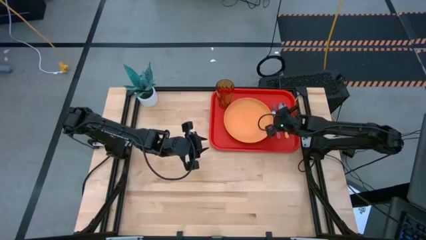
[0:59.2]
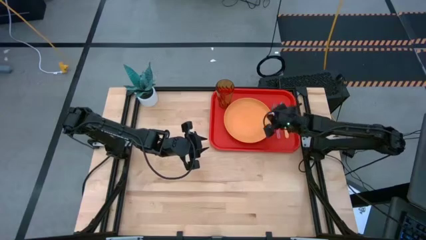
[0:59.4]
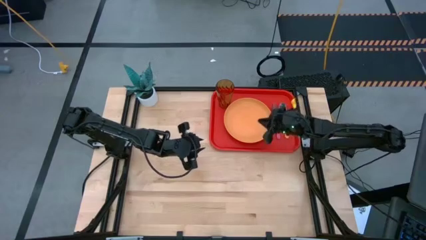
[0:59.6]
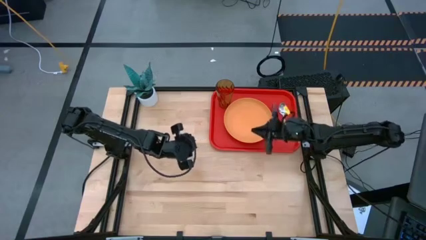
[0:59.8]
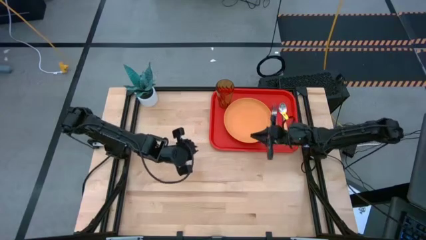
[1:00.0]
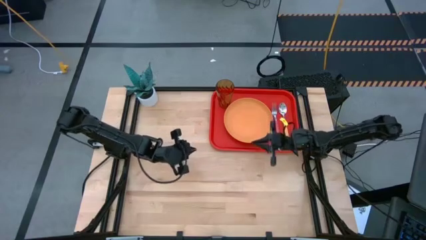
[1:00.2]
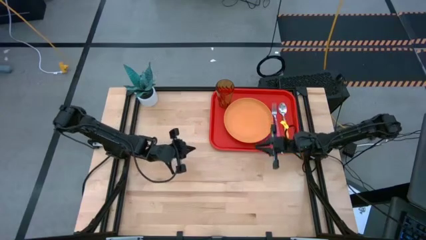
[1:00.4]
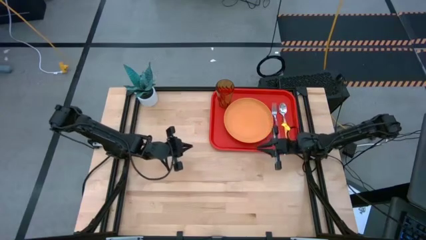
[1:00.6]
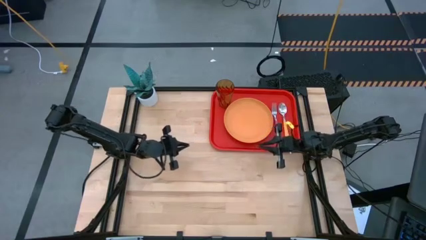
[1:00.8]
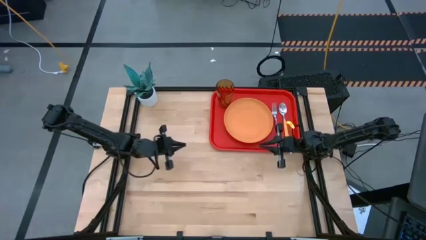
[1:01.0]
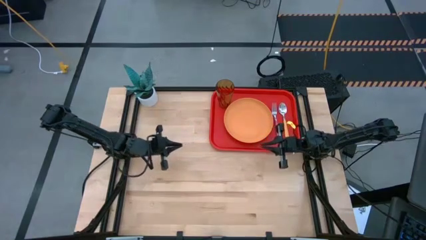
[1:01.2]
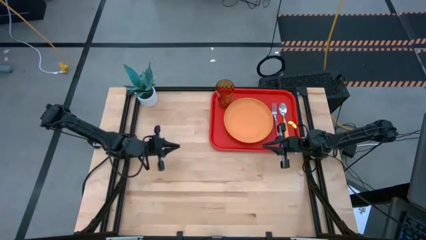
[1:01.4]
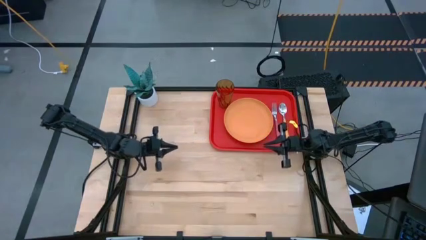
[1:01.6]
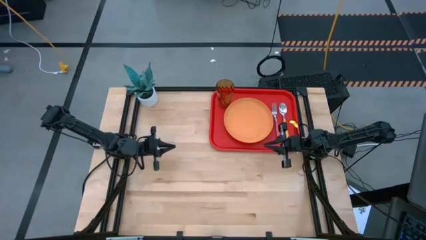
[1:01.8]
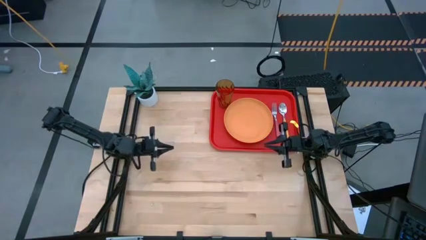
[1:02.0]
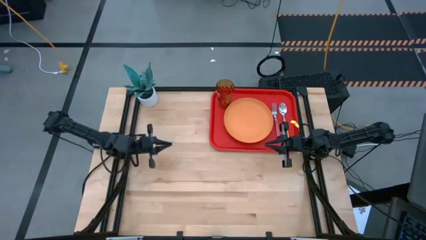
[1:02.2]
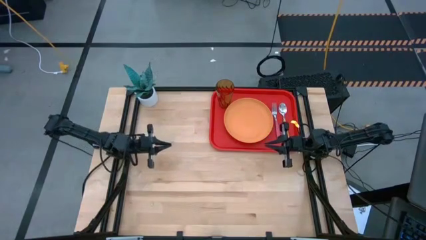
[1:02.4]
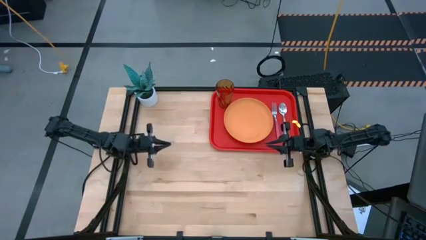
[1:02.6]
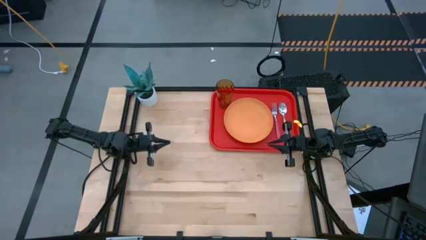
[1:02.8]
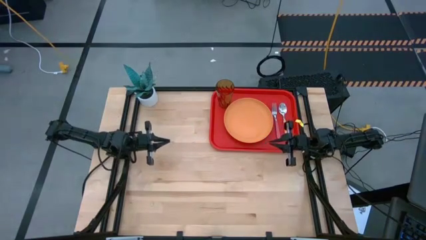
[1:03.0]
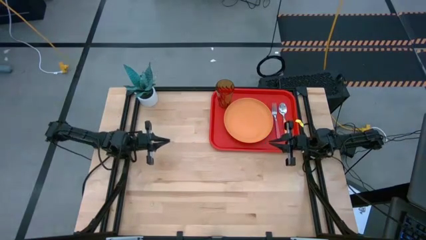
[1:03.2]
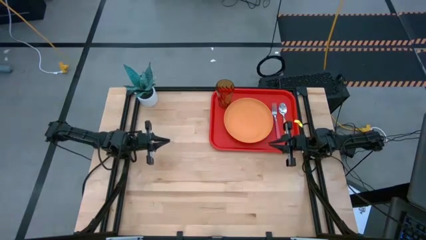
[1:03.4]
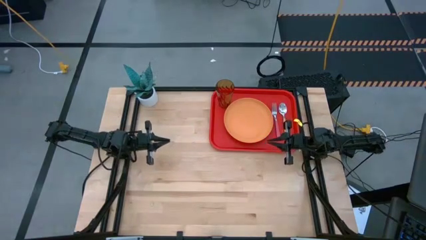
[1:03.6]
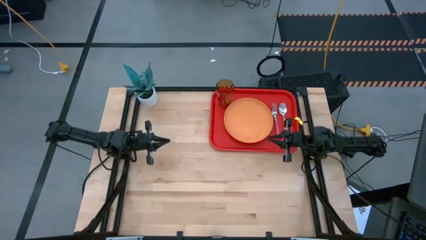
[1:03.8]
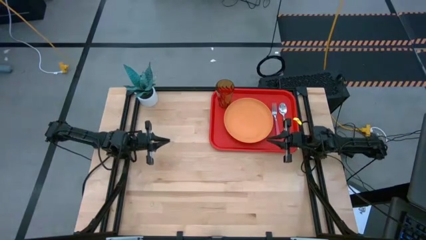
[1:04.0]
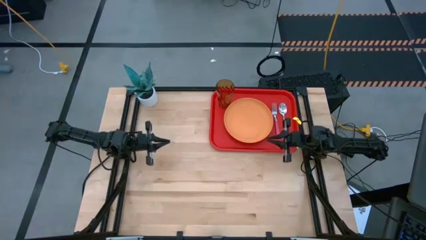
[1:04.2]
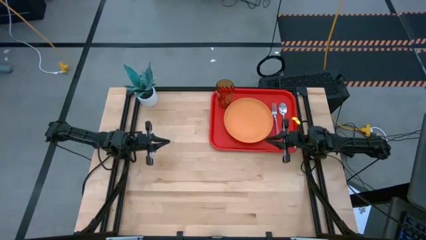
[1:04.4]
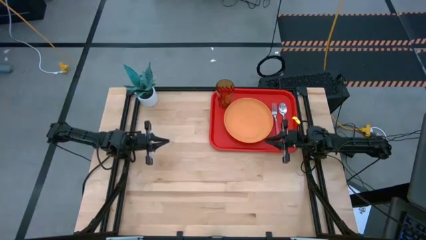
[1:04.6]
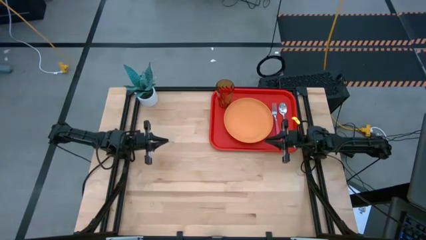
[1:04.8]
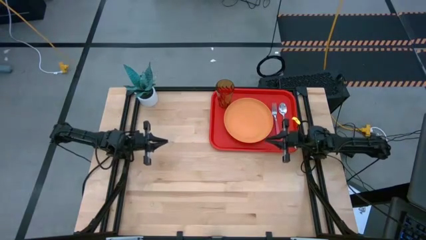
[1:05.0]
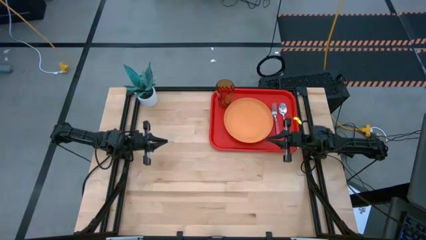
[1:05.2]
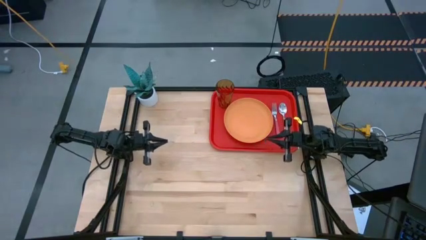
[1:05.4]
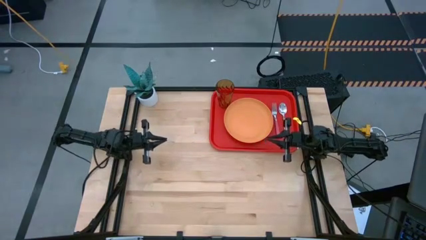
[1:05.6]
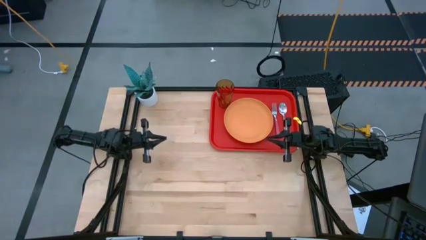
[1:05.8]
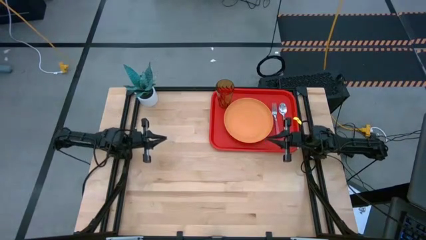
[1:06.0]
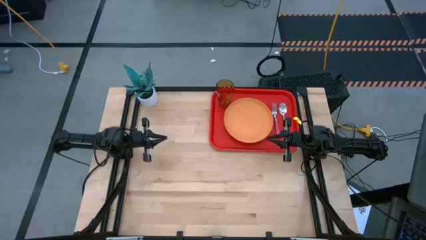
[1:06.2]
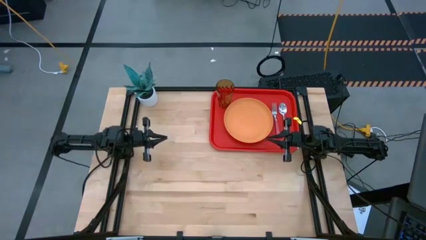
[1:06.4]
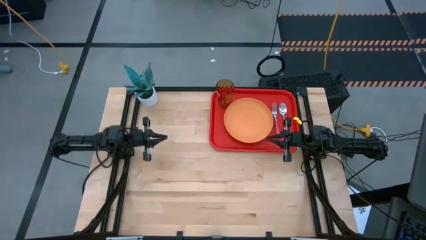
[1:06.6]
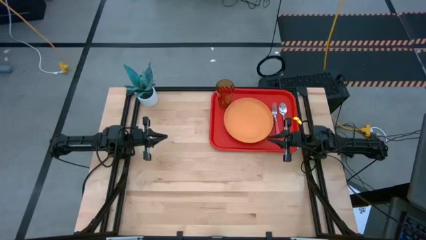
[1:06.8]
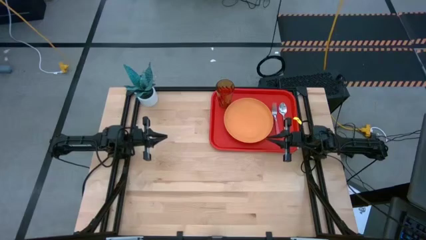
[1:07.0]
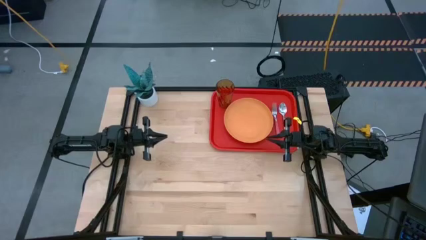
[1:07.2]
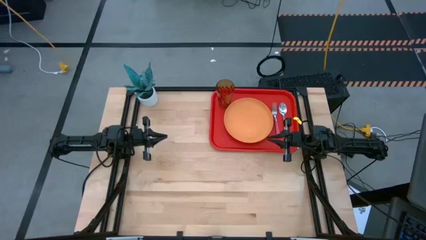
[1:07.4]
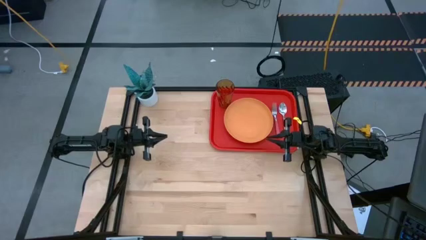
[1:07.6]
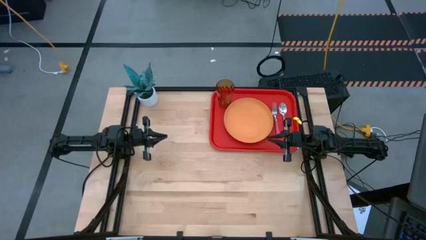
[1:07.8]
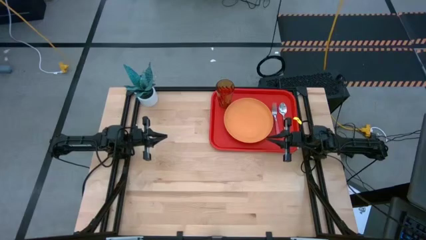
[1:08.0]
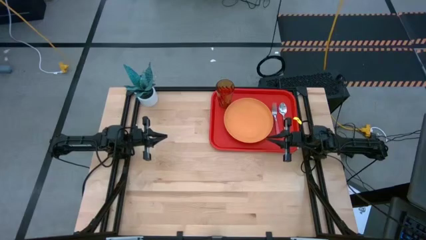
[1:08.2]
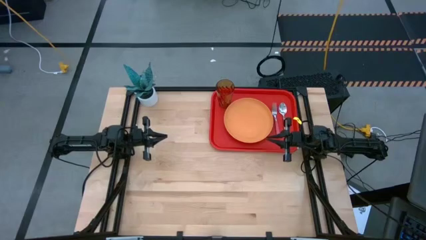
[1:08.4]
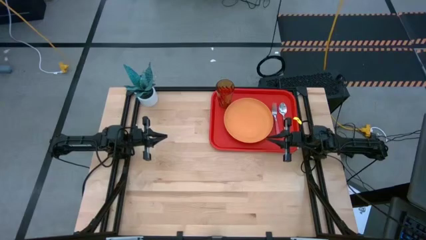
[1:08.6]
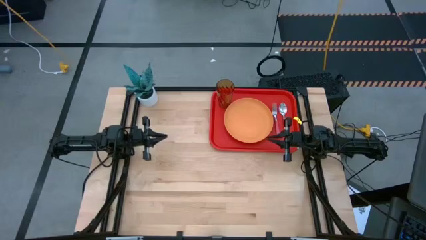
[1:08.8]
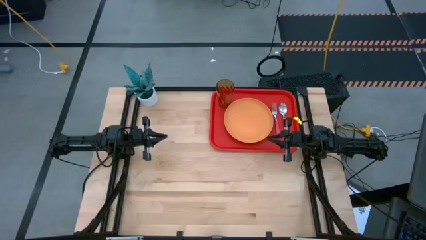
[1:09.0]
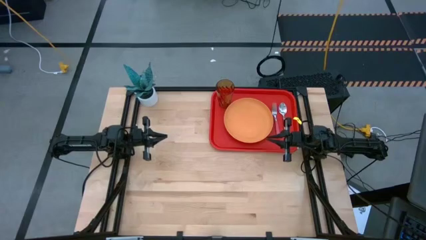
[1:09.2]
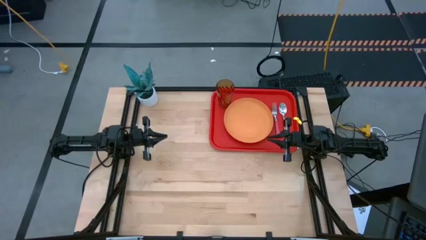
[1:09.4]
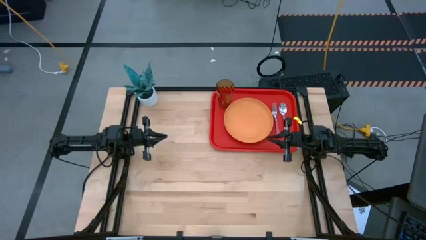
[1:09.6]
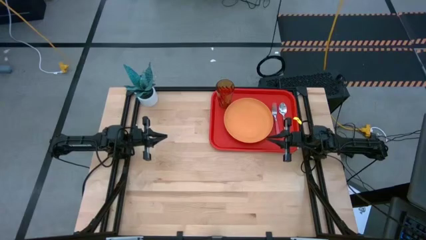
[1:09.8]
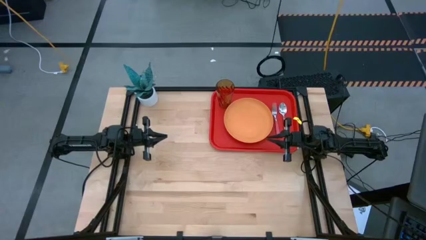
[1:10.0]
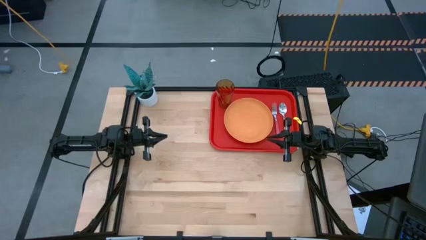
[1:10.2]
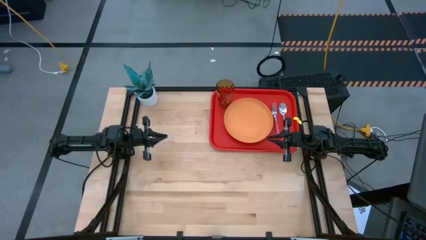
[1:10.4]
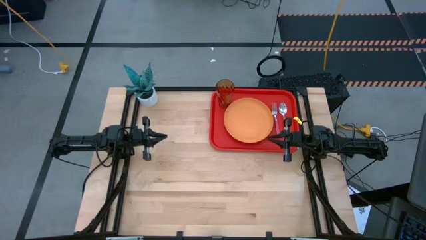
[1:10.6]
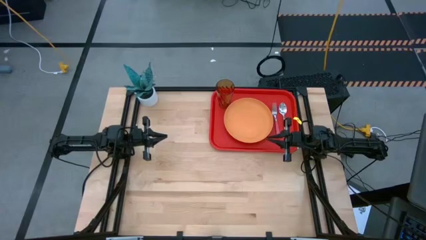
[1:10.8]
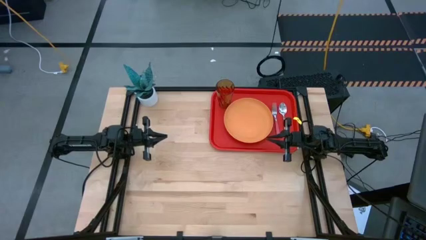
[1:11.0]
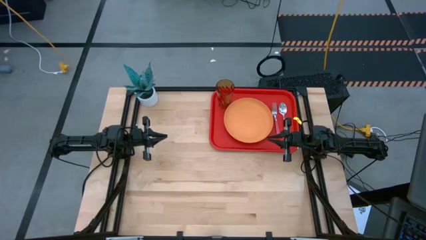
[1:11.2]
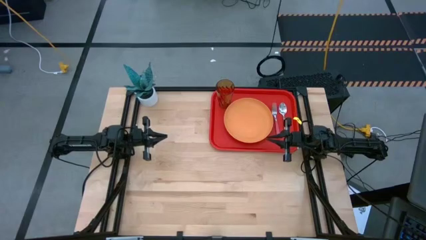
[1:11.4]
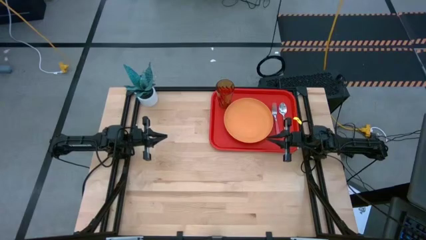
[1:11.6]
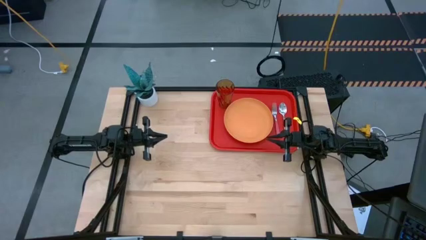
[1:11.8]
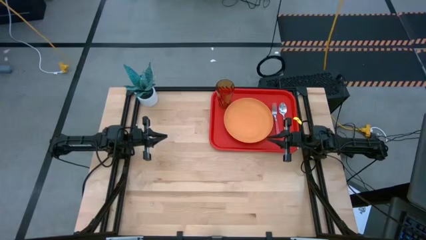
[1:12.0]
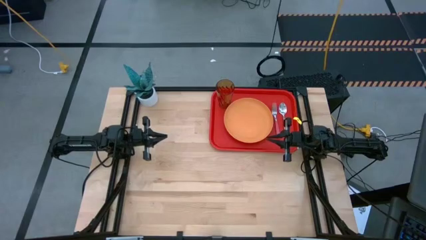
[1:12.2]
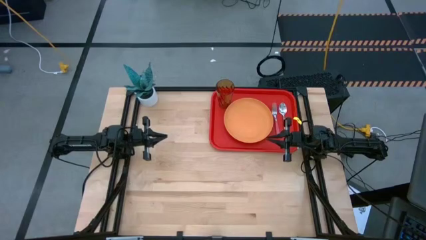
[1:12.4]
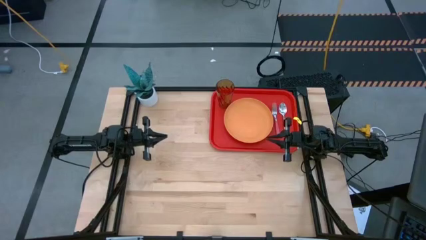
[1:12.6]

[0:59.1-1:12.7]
Task: Pick and place plate/cup/fork/spoon on tray
Return to Home Position

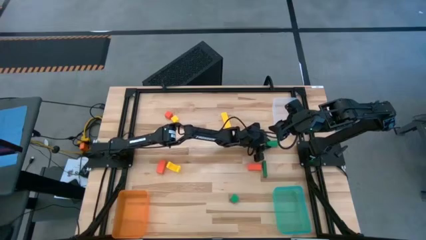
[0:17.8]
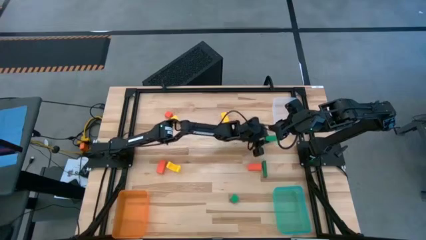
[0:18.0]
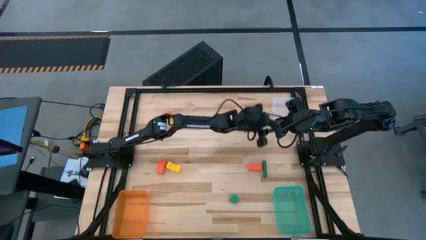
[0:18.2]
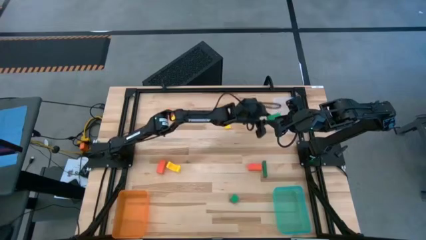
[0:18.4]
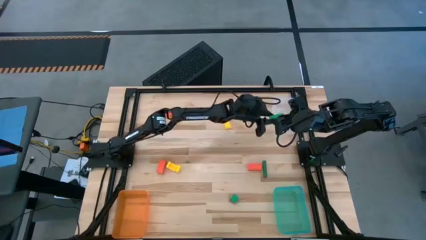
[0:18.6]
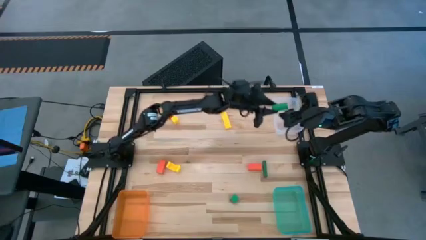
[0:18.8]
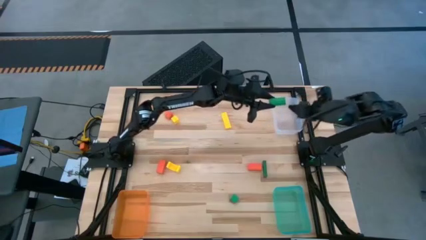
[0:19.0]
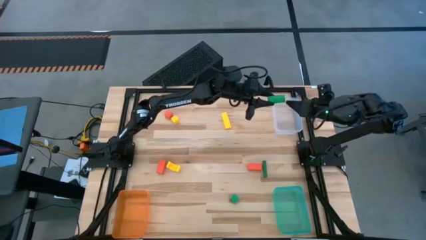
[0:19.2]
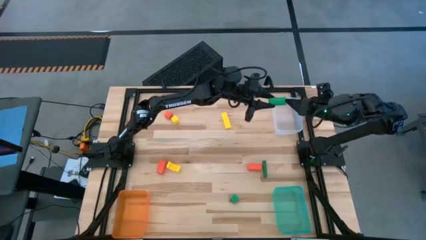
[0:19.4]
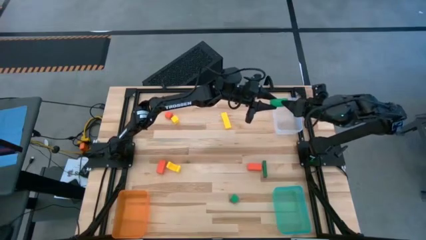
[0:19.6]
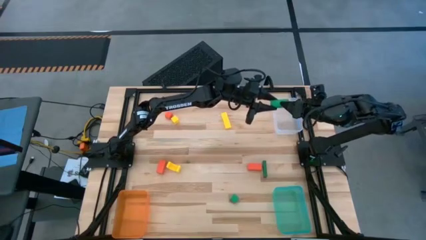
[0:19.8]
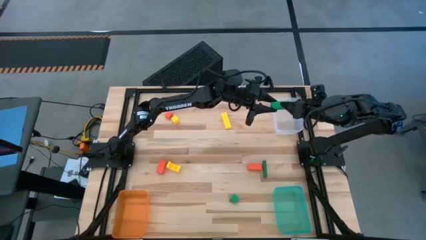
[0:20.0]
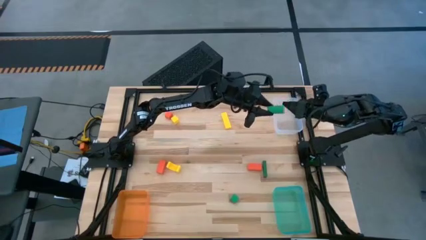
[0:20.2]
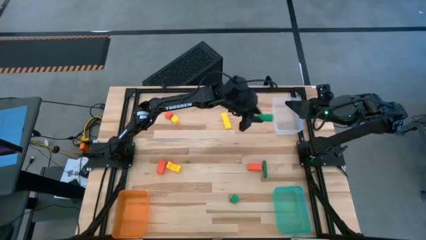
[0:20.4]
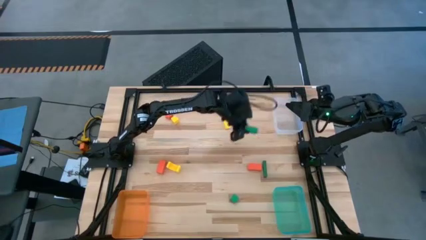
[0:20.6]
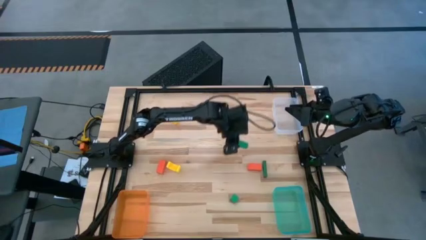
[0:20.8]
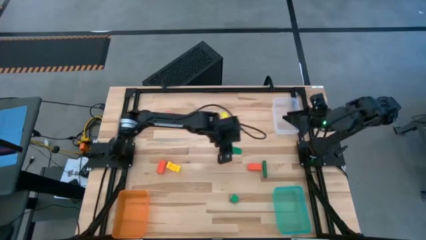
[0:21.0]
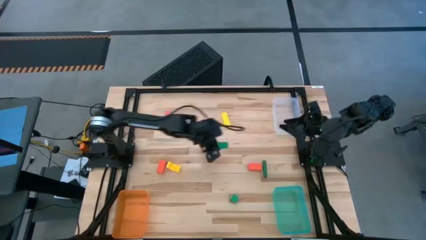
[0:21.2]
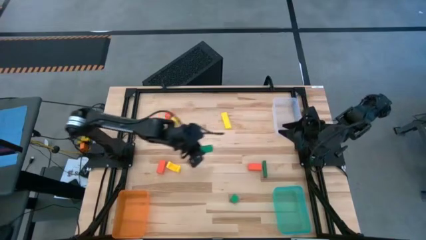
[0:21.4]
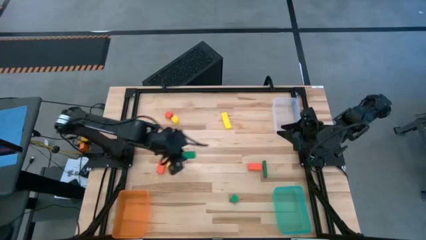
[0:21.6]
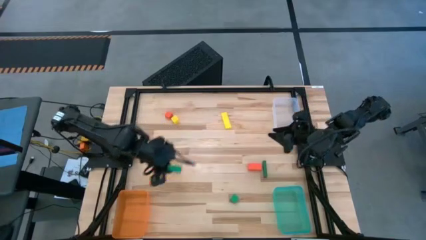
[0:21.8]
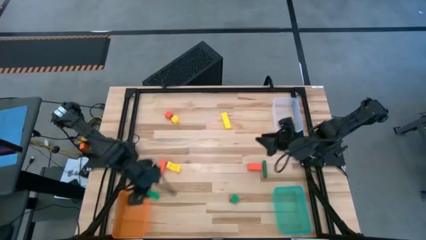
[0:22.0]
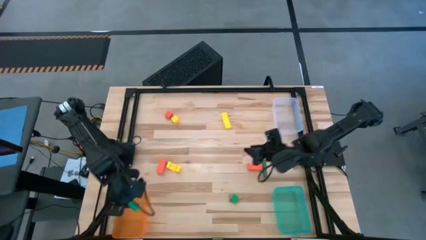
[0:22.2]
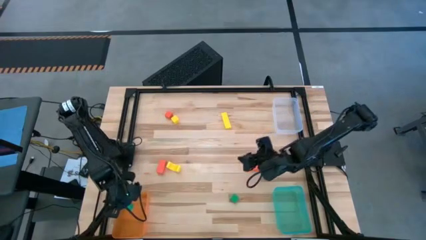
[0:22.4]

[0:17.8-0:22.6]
Task: Sort & place blocks by color
Put the bottom left green block into the orange bin
